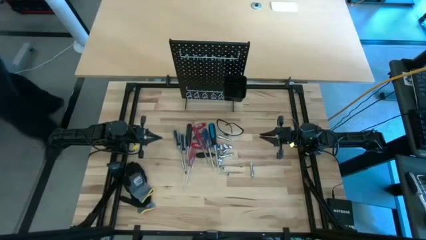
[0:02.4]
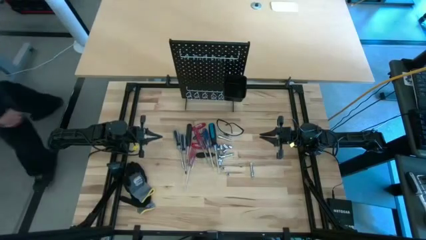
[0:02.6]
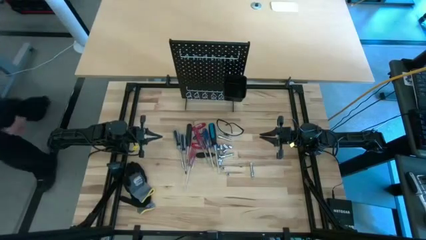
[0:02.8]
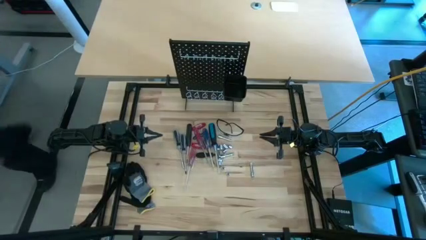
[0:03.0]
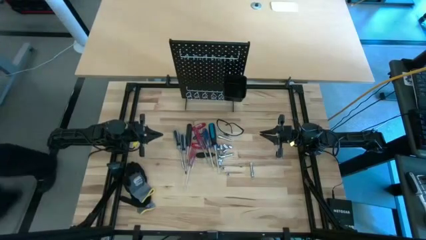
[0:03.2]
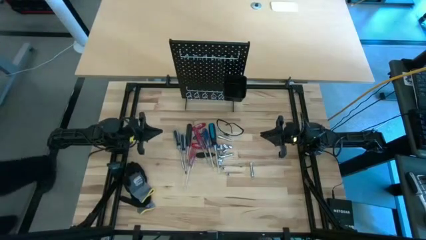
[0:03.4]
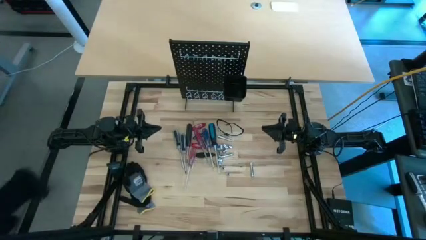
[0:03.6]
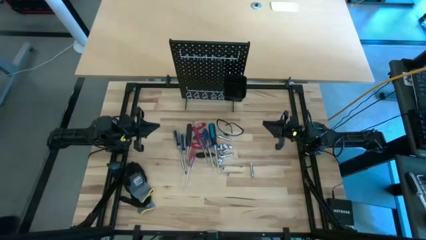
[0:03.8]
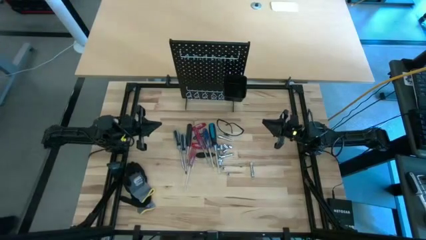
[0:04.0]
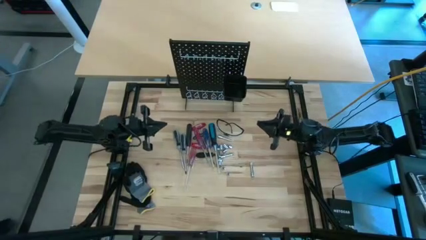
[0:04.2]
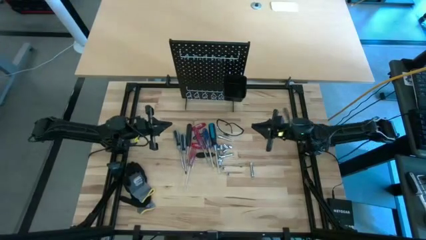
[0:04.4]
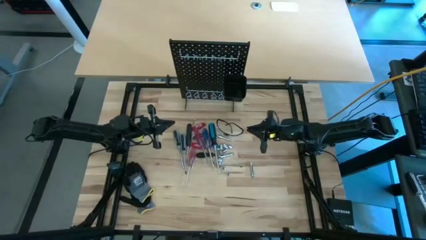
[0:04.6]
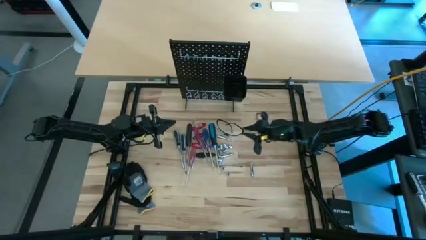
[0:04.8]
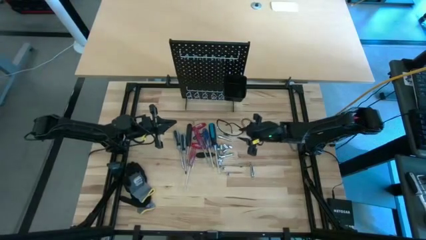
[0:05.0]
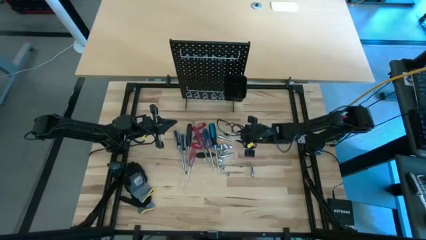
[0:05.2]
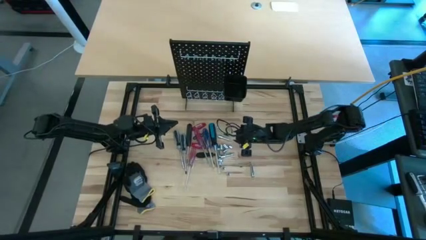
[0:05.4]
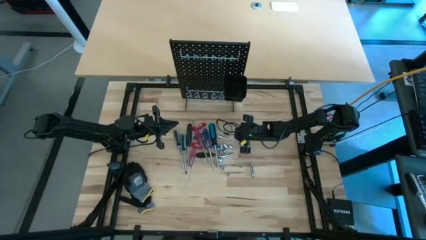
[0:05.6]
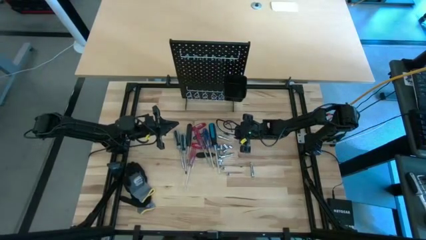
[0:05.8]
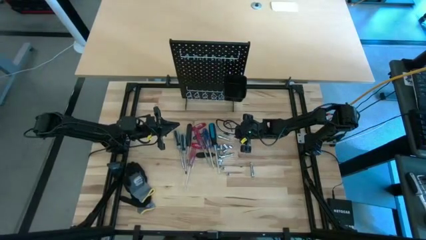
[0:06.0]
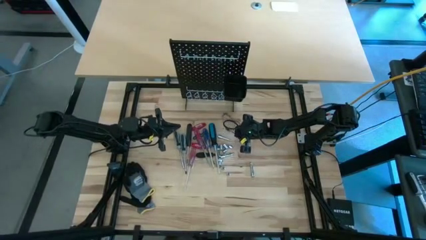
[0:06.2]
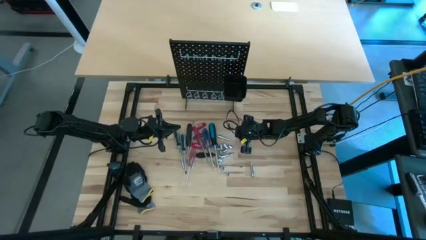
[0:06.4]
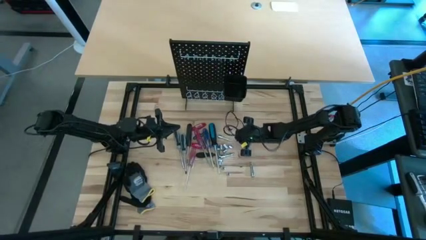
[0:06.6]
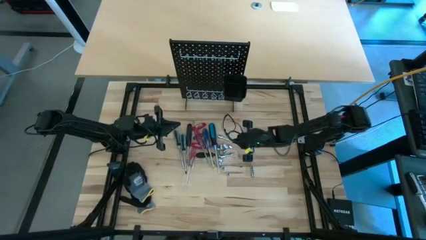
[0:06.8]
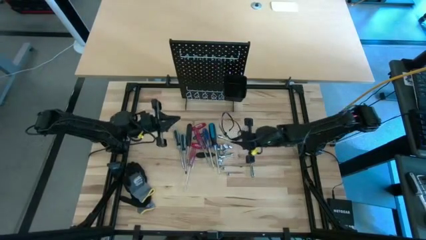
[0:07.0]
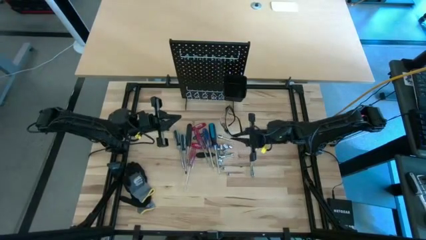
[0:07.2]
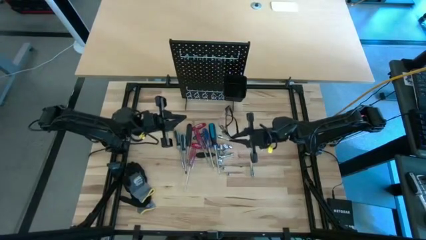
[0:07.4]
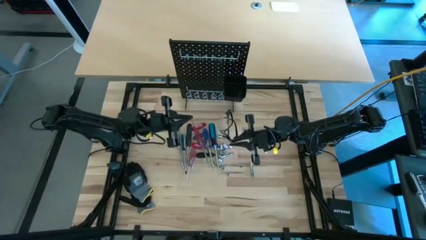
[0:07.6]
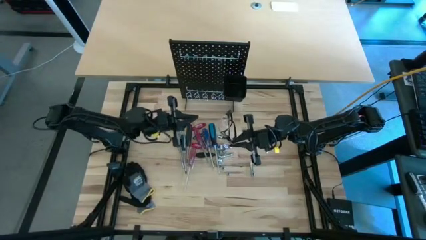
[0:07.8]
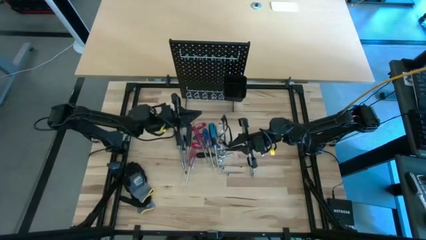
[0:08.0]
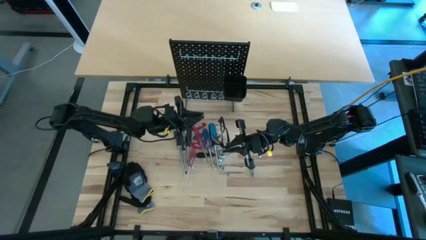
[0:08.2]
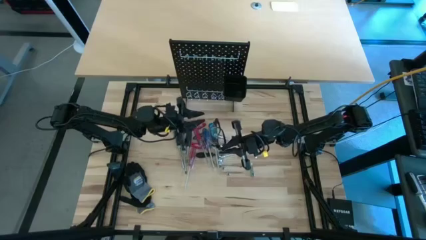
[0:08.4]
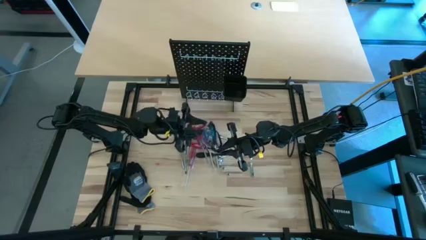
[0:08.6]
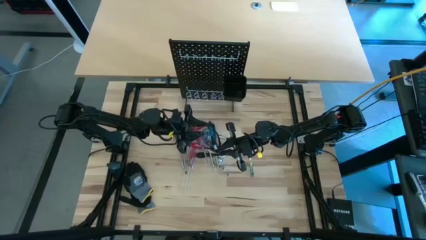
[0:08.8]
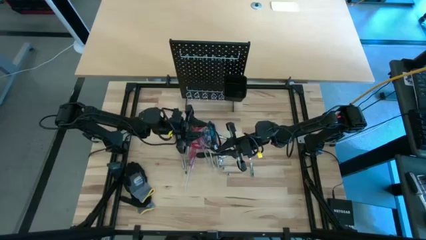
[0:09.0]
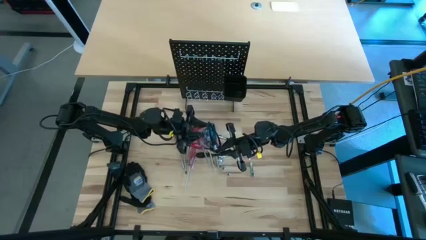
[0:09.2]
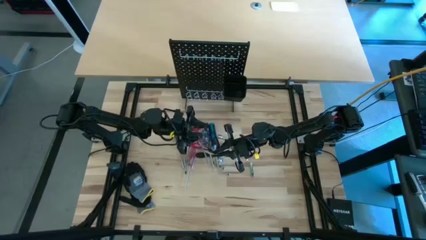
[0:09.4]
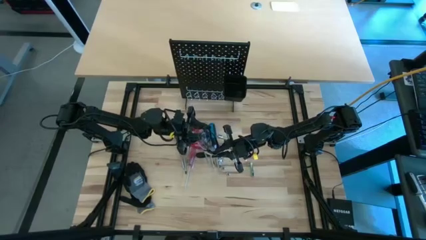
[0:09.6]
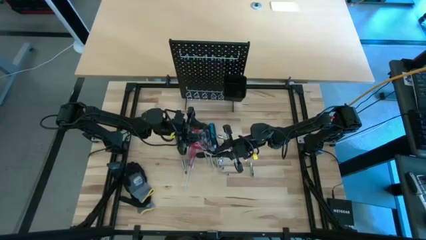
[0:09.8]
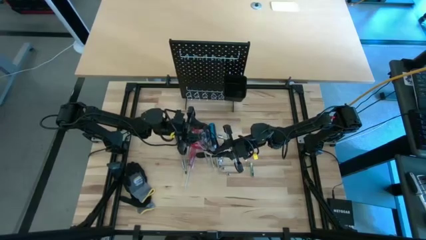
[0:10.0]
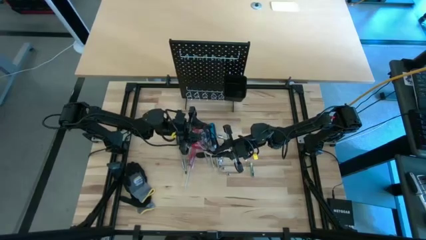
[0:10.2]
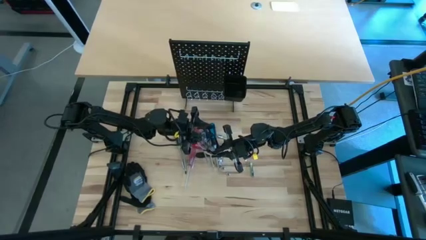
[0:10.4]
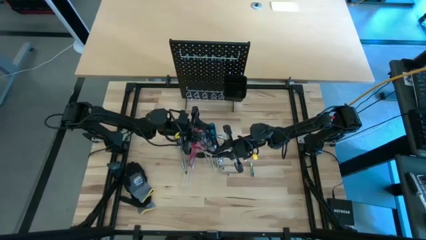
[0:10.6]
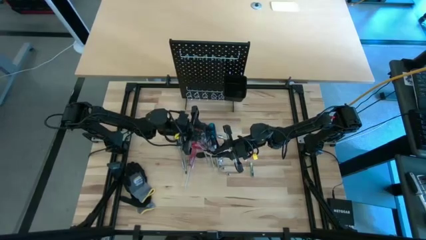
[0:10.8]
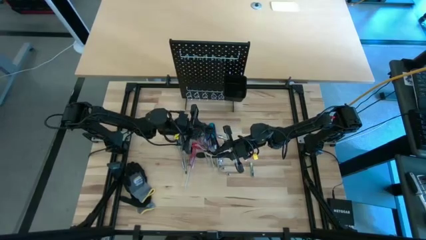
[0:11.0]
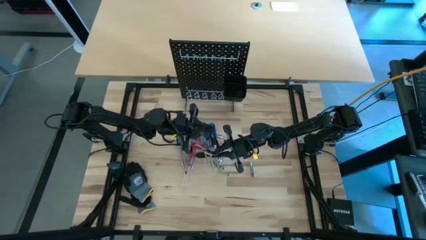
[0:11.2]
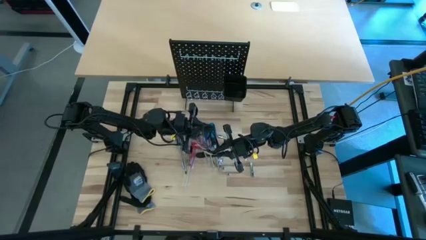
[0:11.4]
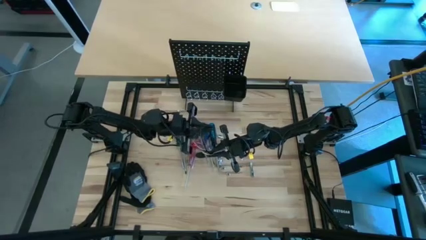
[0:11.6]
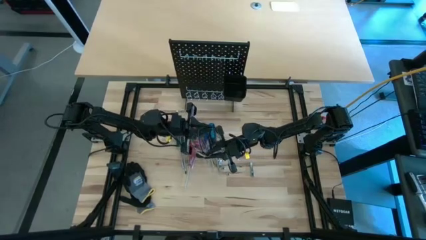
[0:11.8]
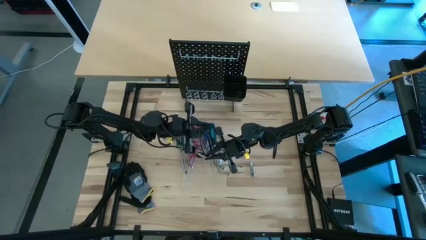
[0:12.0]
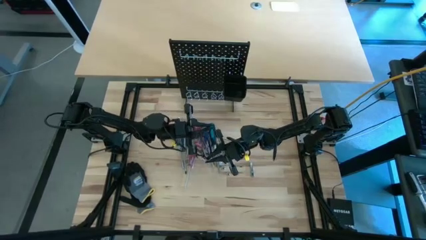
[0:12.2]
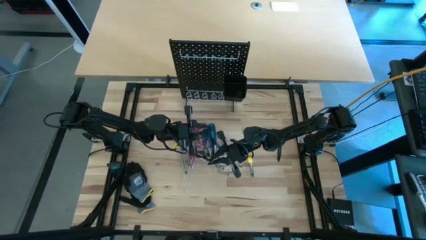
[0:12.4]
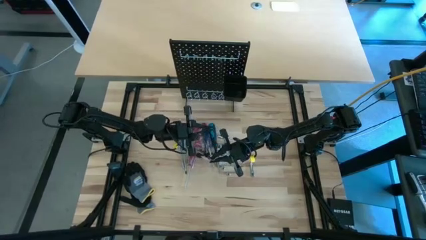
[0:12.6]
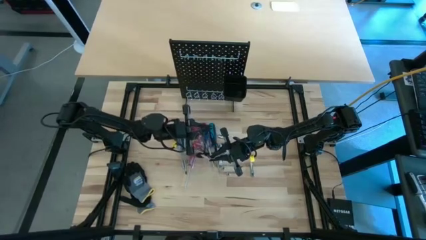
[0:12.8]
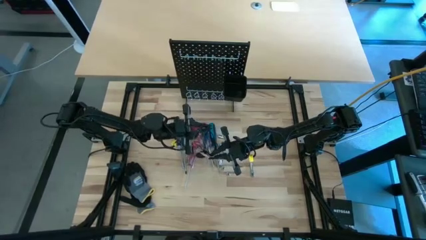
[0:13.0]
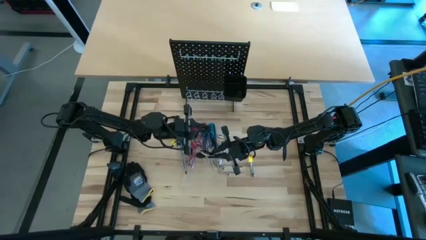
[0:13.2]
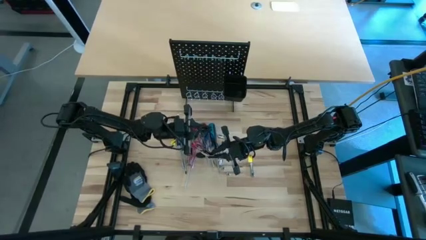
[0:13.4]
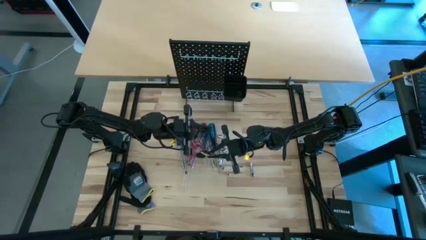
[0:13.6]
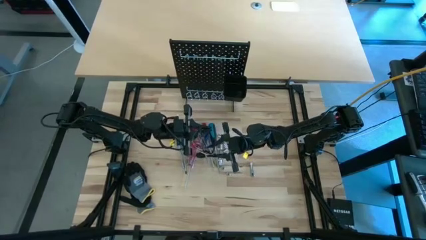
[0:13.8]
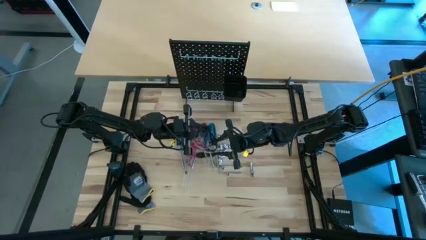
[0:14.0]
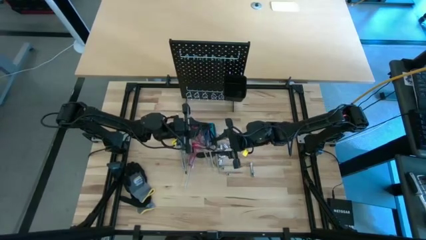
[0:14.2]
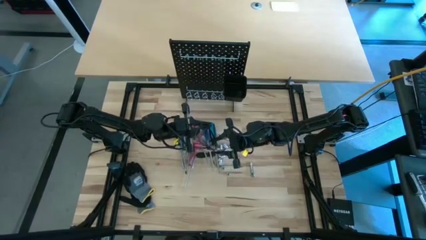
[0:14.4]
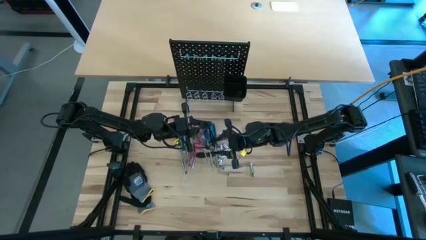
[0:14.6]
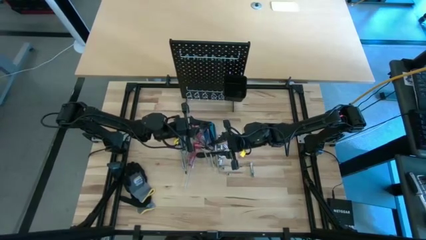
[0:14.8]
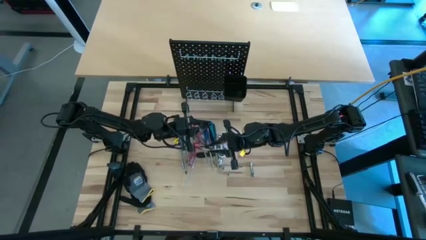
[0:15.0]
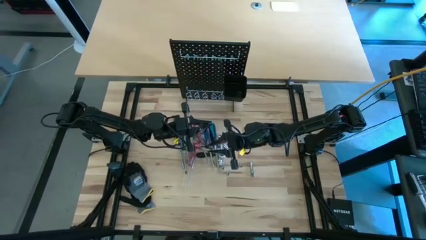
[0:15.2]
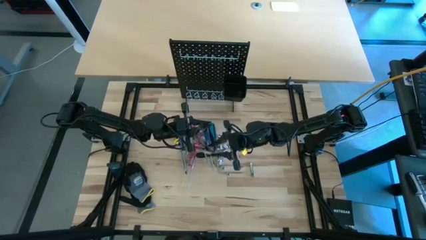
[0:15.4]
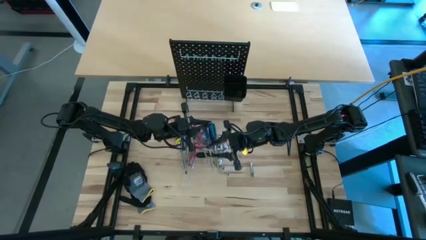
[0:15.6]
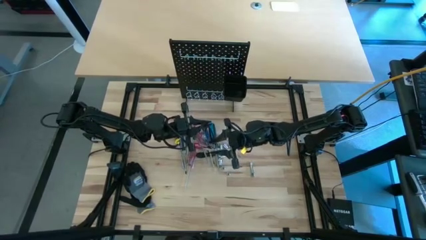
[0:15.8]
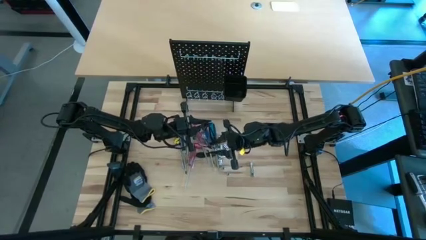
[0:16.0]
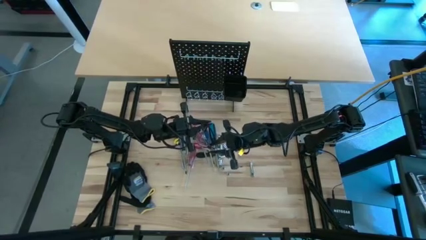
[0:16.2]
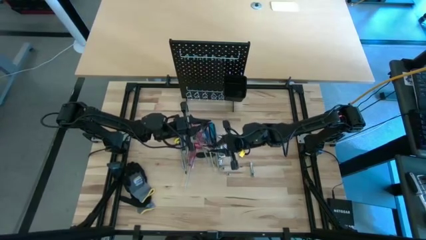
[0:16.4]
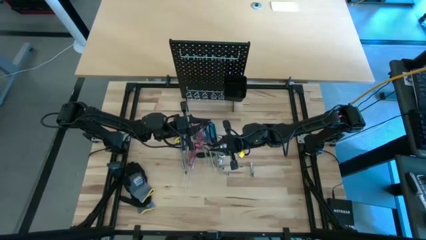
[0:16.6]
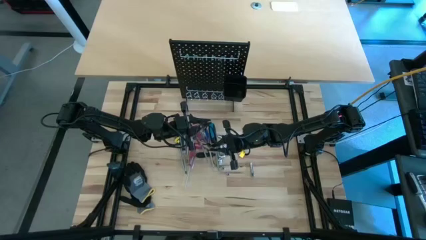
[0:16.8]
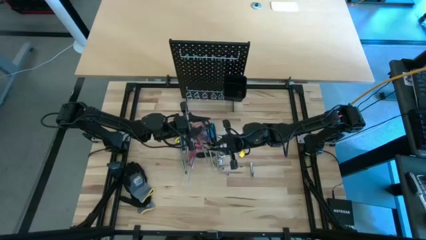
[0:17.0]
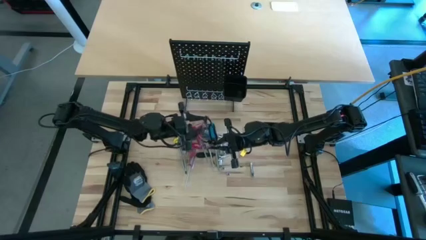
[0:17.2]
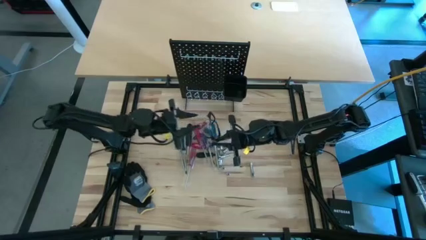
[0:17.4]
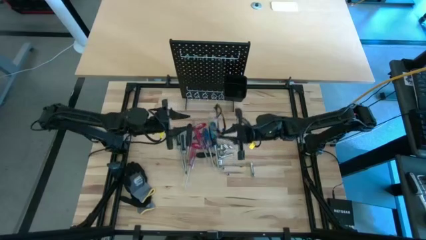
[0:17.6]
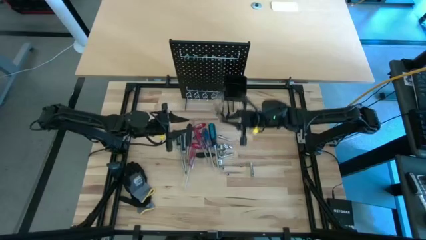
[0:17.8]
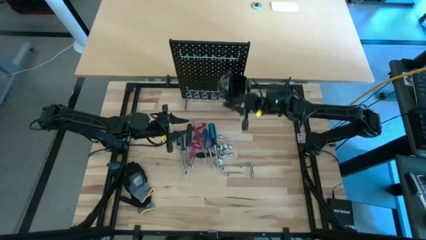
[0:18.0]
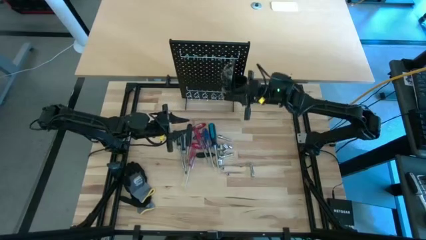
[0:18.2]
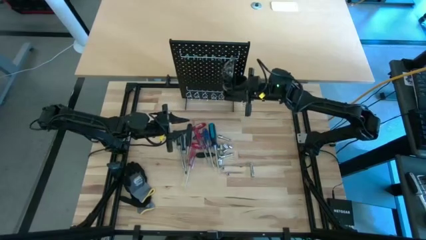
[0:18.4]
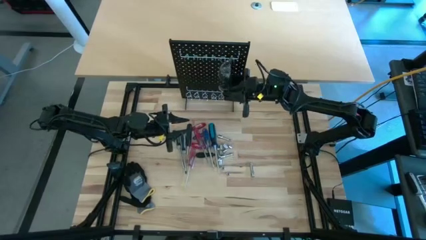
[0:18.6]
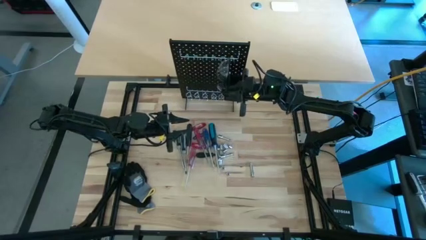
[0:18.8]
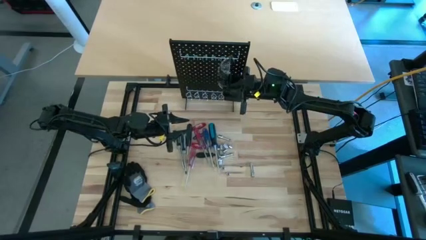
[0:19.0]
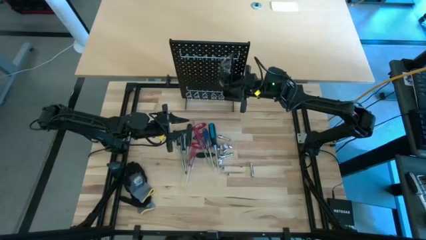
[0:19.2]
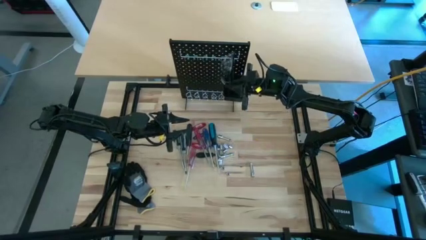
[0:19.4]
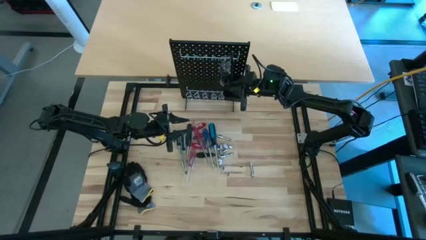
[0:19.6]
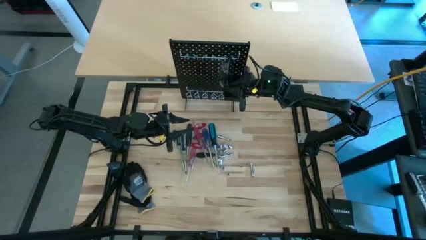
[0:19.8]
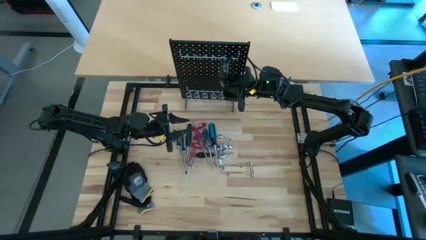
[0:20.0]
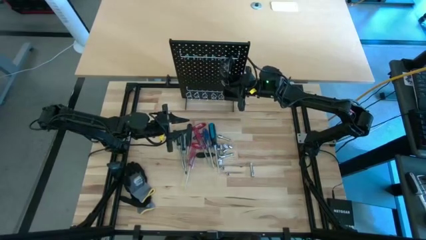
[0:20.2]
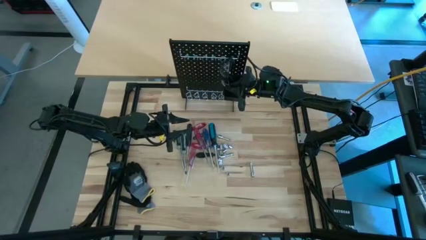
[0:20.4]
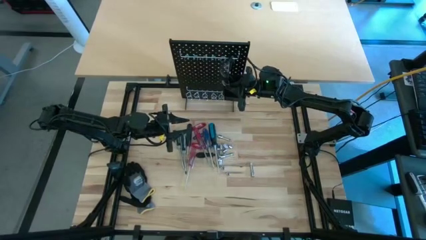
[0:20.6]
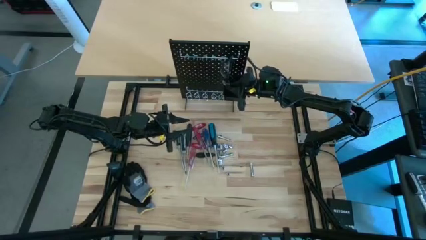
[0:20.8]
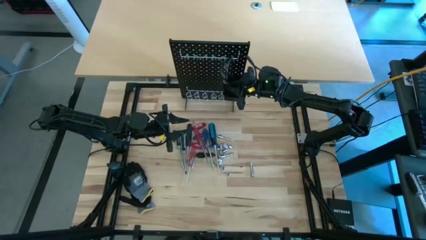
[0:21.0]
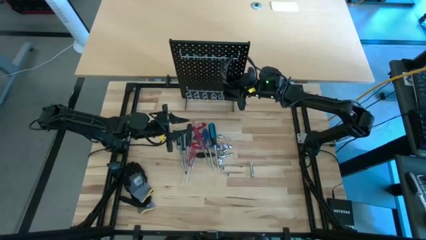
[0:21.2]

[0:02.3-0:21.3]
Task: Hang tools onto peg board
Hang the black safety goggles on the peg board
